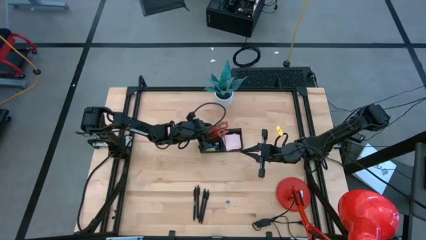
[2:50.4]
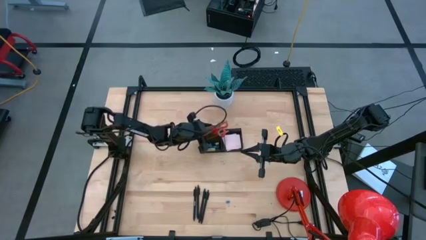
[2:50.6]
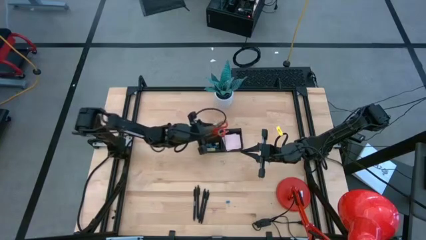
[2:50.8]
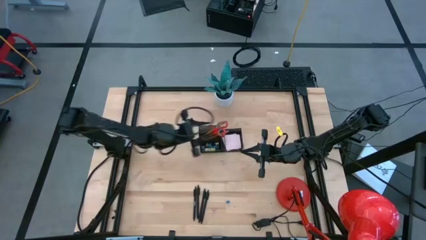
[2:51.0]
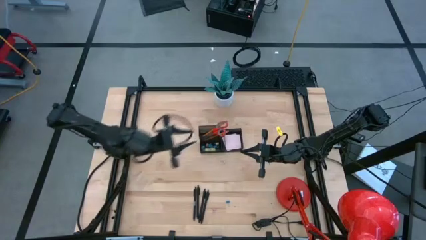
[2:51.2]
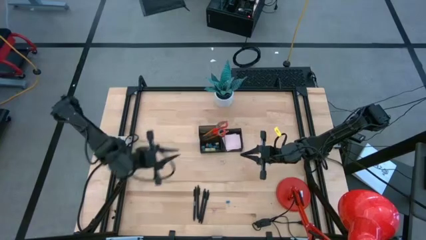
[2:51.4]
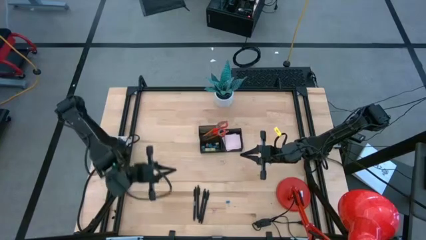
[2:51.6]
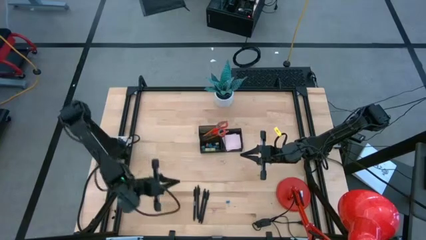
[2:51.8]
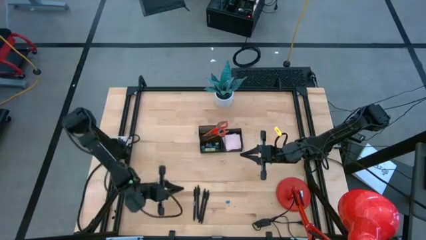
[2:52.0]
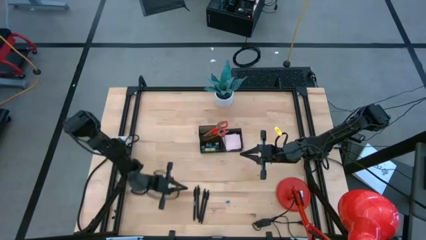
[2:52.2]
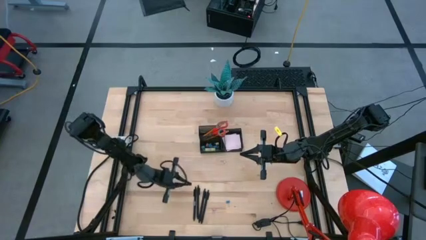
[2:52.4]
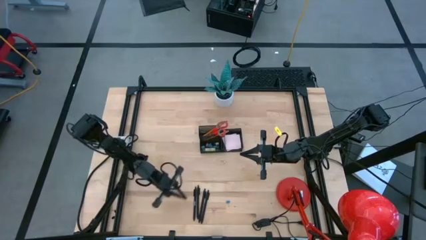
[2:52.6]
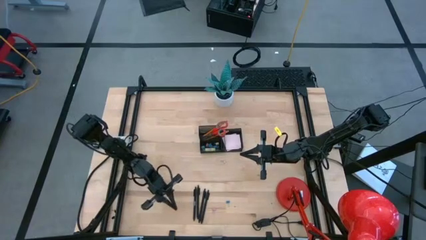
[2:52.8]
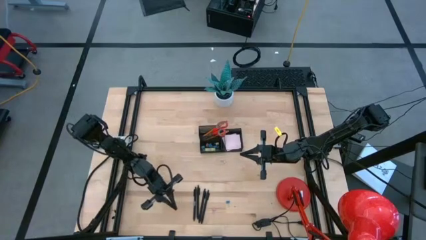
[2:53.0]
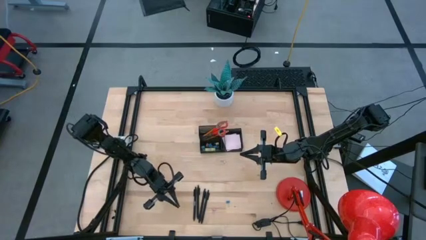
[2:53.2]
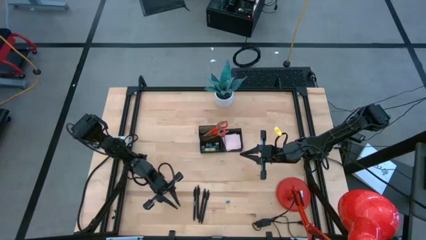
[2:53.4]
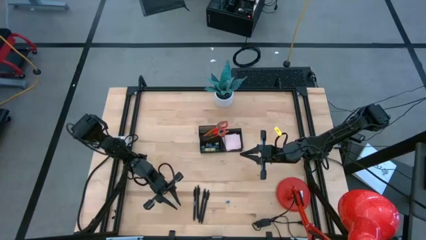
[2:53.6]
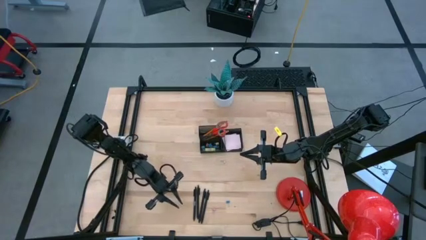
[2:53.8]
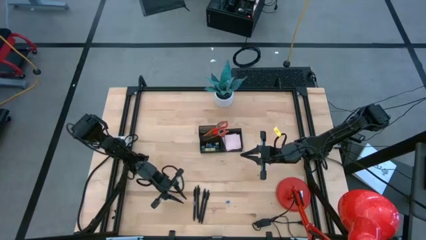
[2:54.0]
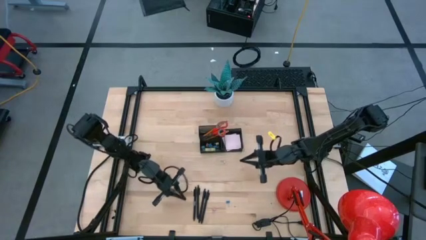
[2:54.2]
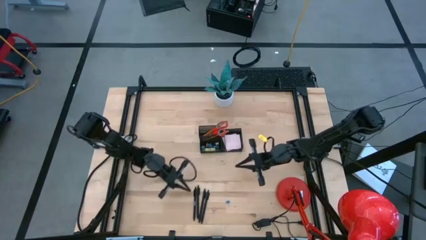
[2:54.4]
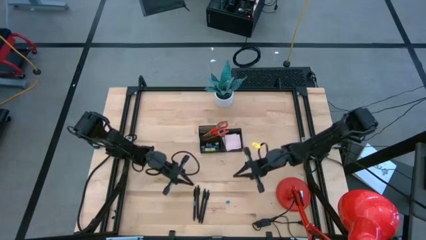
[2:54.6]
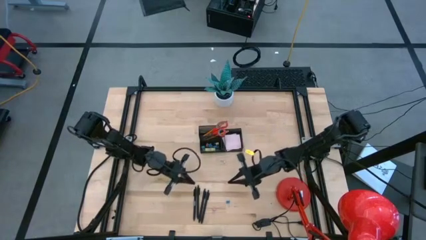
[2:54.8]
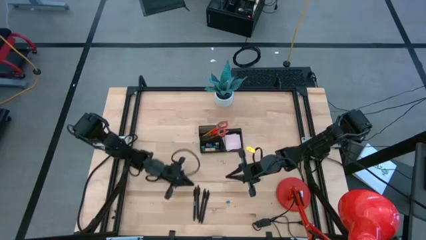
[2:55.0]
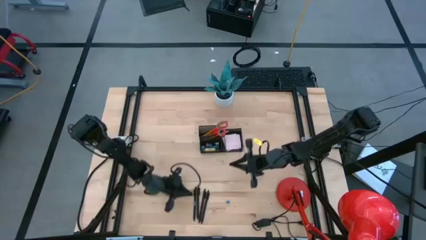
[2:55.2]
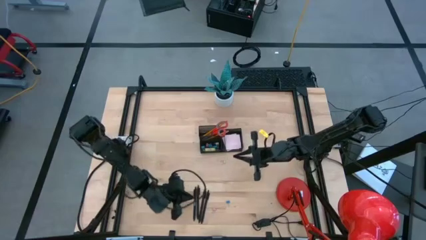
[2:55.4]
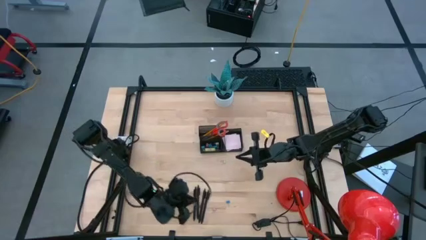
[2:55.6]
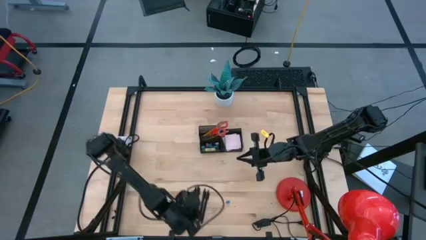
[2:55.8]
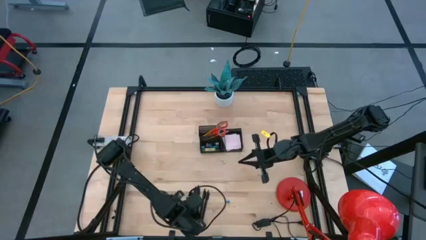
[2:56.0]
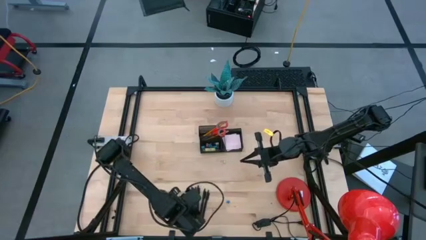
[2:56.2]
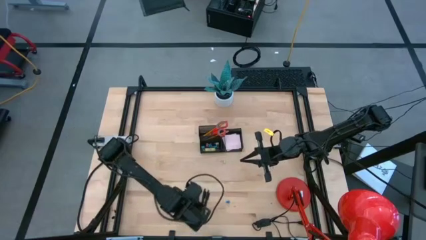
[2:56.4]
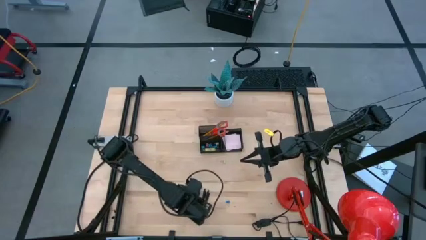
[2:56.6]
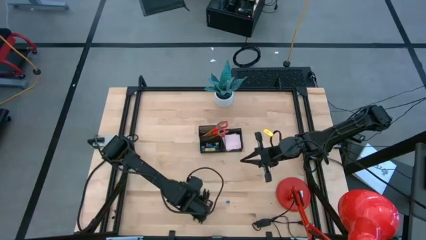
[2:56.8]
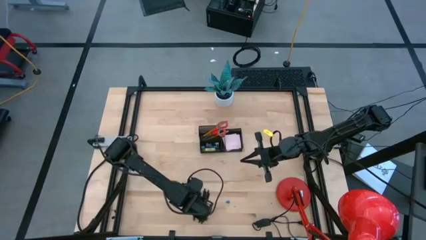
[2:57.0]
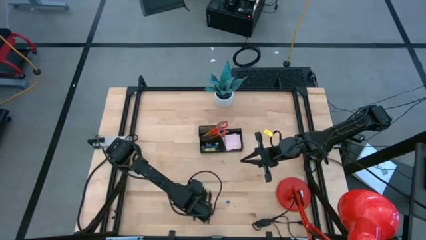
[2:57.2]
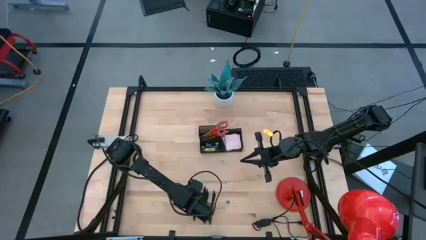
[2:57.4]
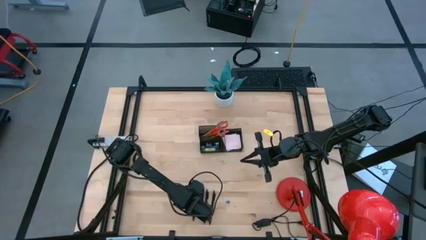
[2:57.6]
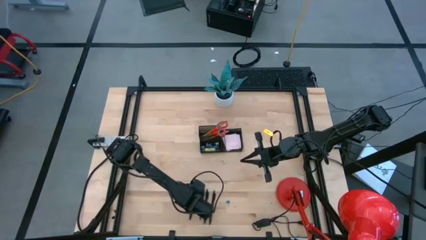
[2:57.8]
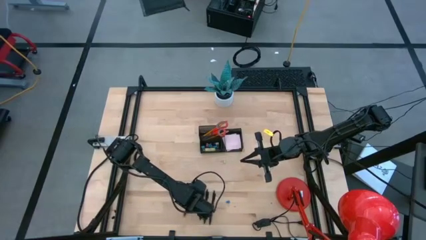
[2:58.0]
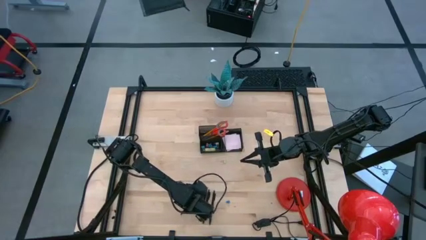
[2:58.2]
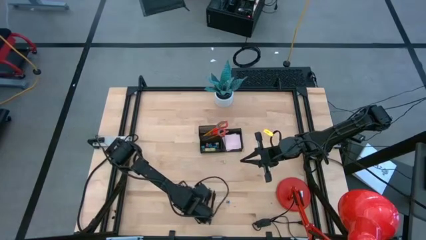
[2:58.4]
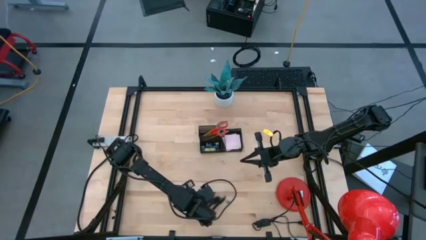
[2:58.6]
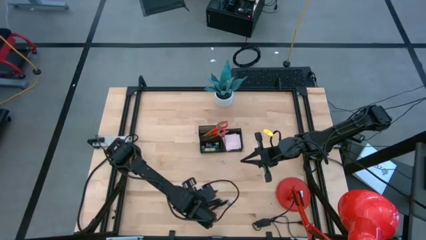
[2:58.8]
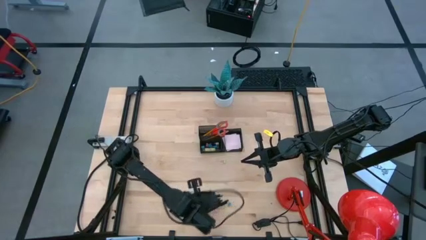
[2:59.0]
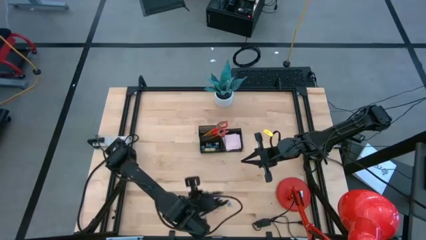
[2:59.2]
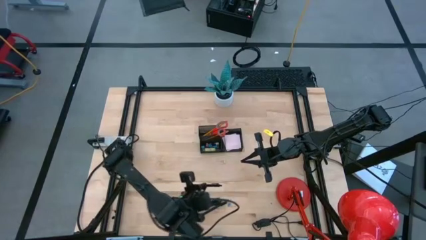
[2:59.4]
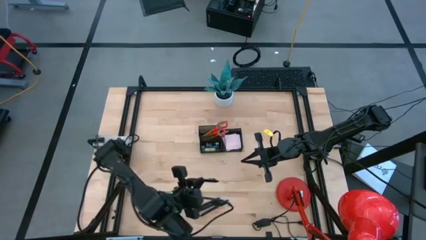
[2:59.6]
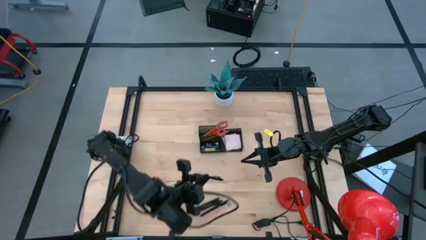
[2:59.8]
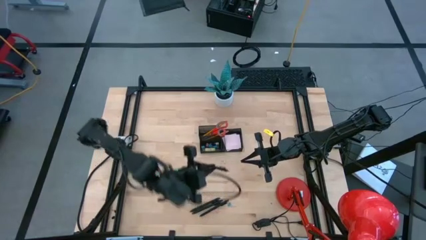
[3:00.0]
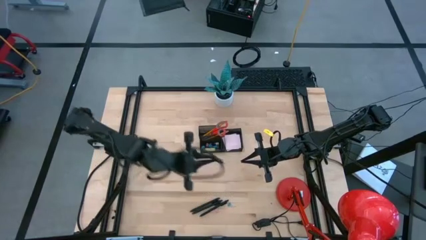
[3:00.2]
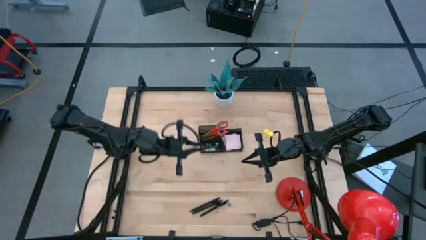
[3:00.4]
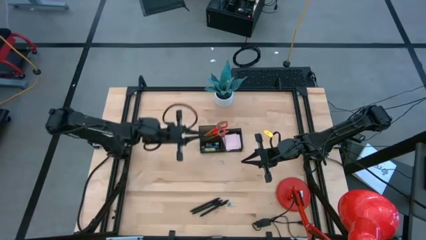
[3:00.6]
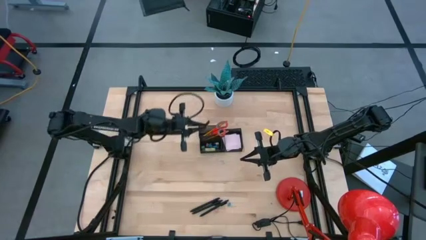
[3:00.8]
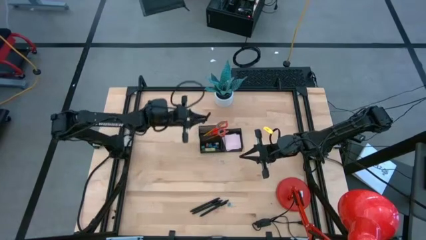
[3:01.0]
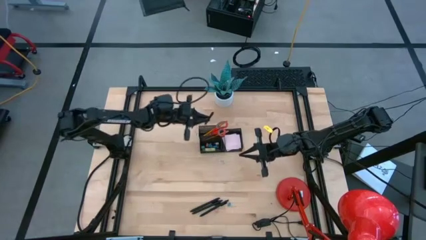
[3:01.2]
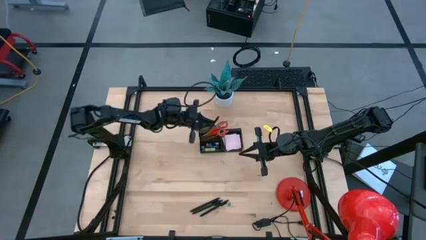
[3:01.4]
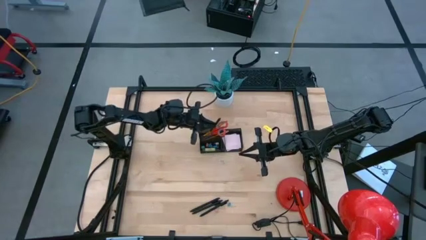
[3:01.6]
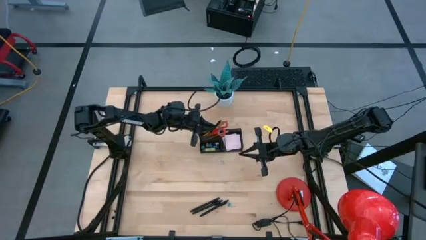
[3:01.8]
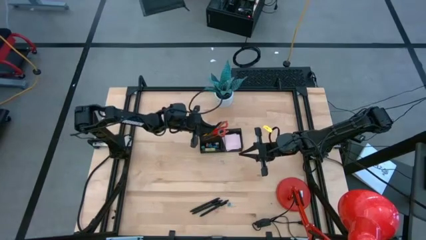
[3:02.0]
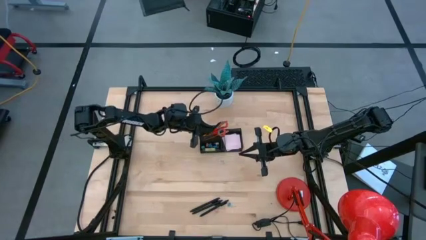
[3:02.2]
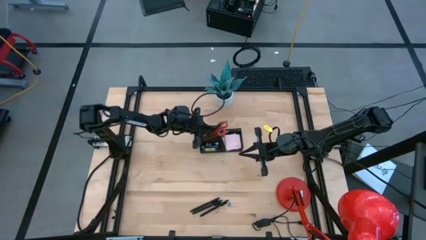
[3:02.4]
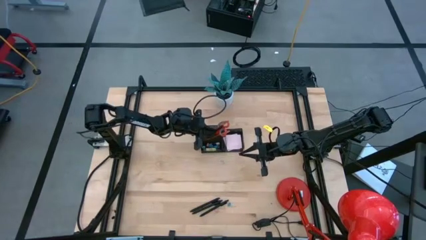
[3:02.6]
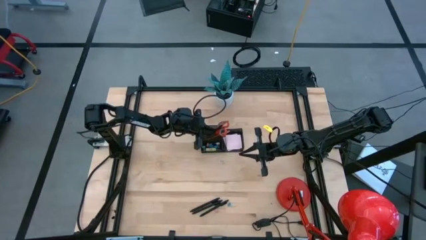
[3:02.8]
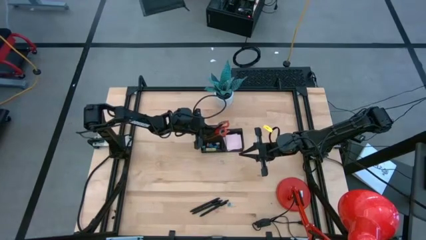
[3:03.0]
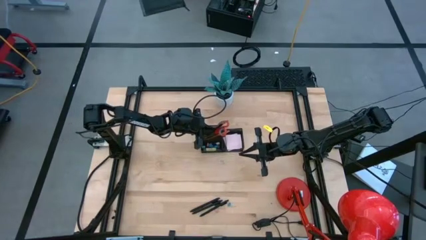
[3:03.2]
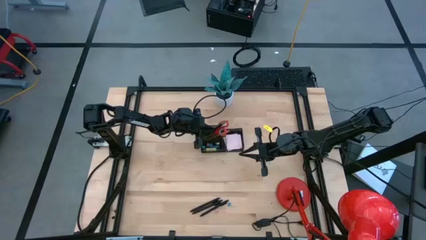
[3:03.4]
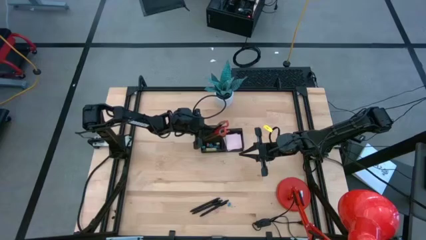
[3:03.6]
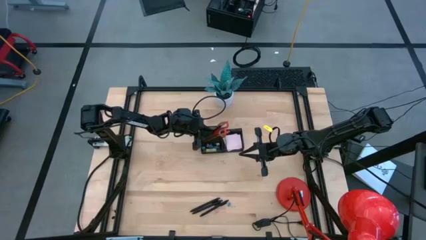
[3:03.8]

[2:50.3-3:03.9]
Task: Pick and place office supplies into organizer
Put the black pen into the black desk organizer

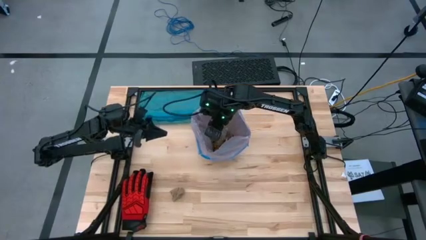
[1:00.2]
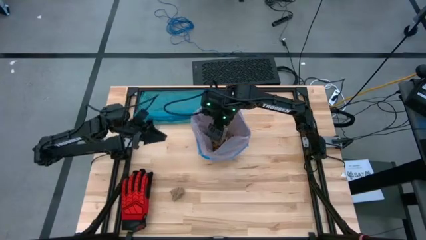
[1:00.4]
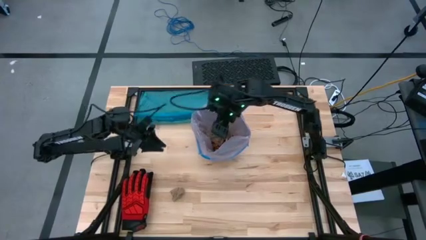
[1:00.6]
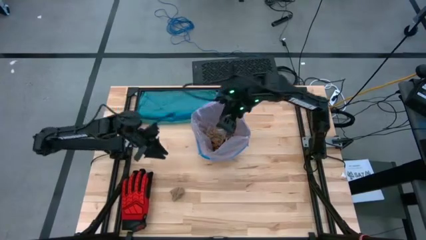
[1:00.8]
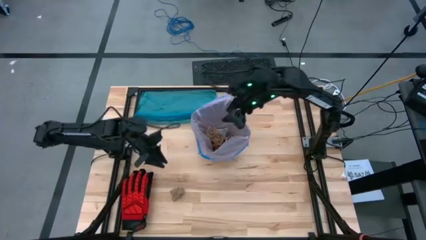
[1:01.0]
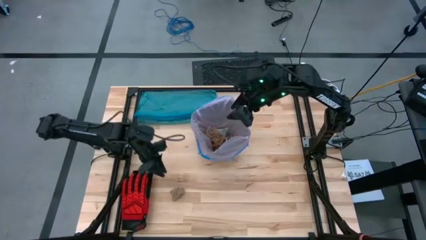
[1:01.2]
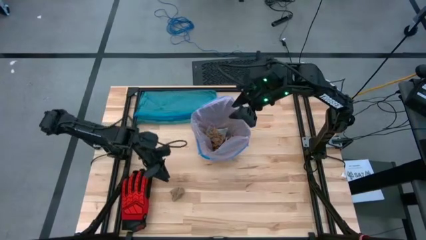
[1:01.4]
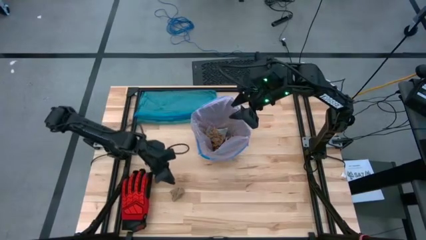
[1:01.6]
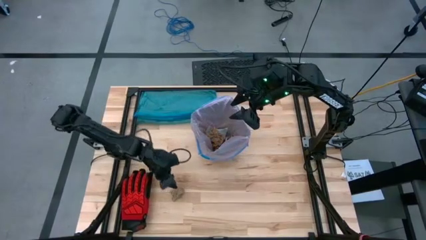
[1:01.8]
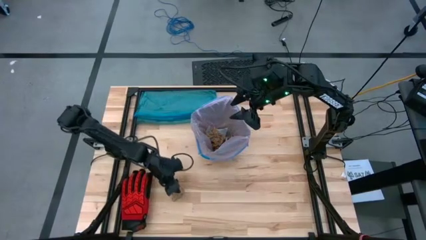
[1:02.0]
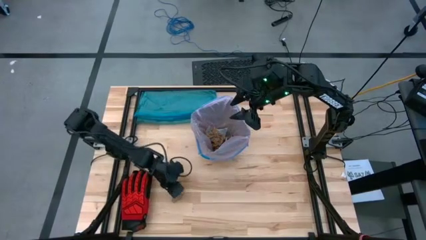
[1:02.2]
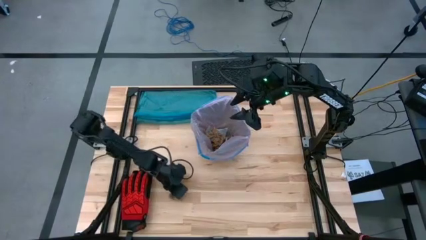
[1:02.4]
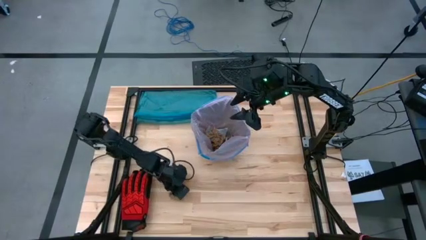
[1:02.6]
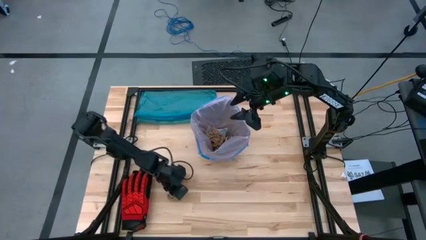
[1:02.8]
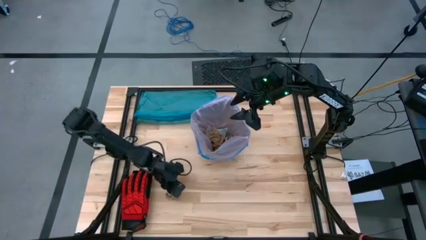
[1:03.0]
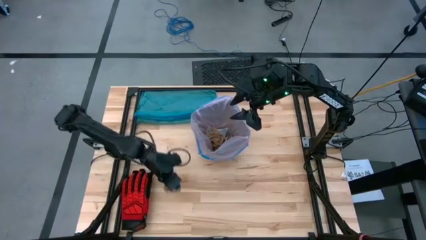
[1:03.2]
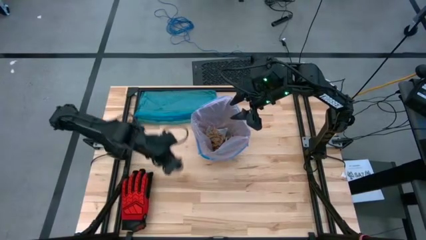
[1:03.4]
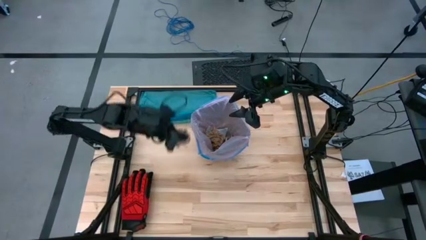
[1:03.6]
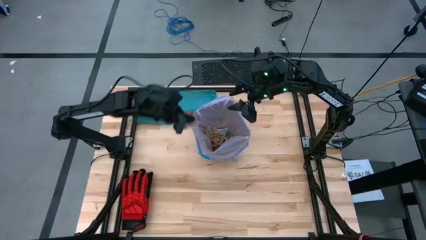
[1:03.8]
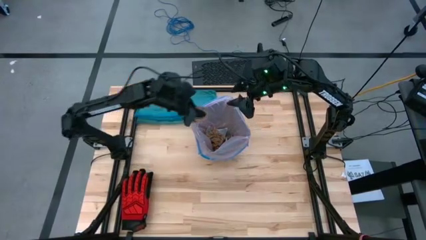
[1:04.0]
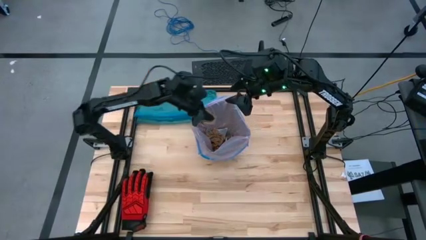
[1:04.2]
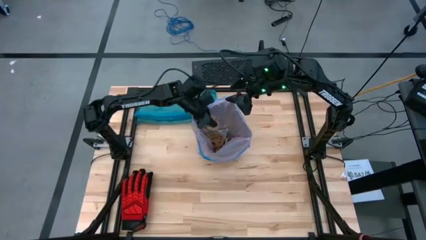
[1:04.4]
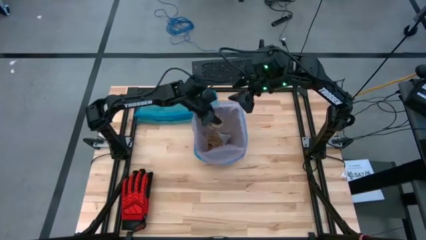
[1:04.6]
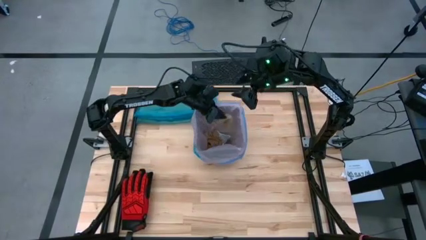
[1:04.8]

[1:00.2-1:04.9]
Task: place trash/remove bag and relplace
Put the brown napkin into the trash bin
